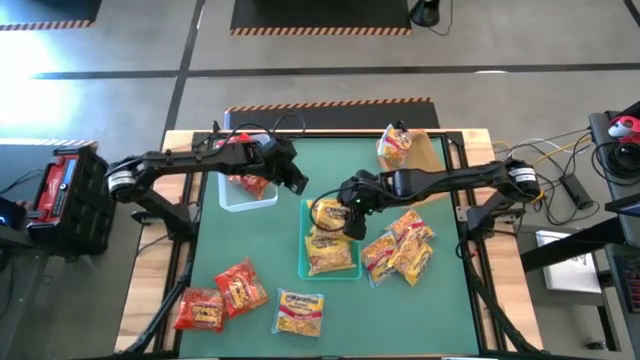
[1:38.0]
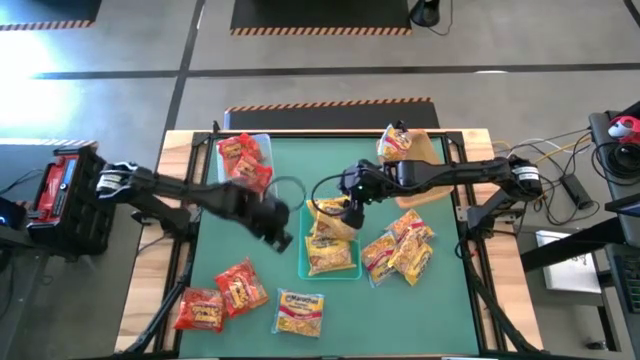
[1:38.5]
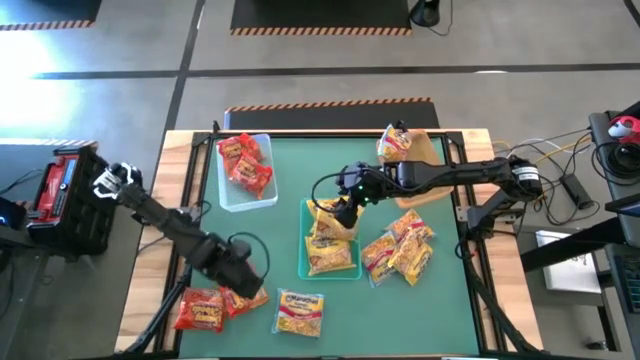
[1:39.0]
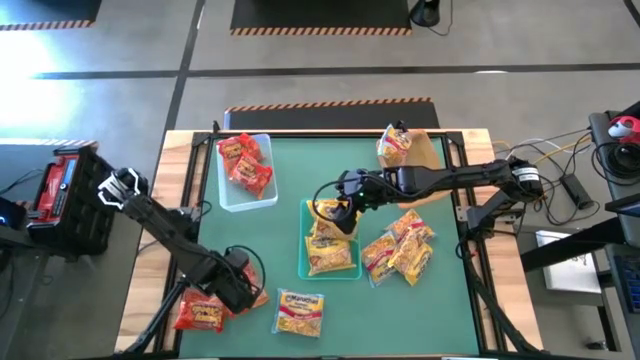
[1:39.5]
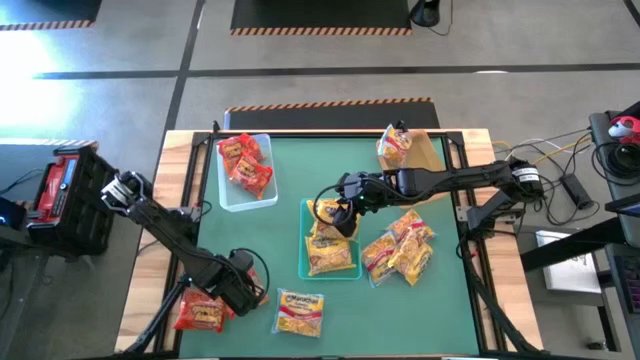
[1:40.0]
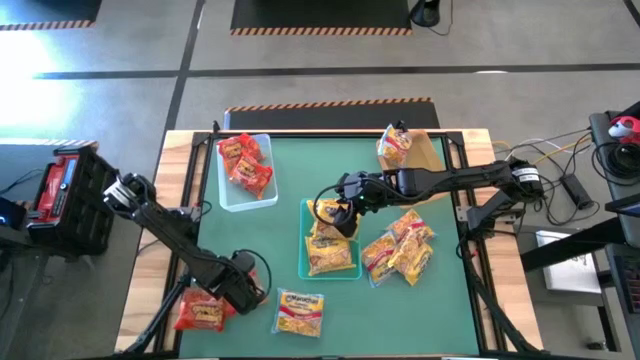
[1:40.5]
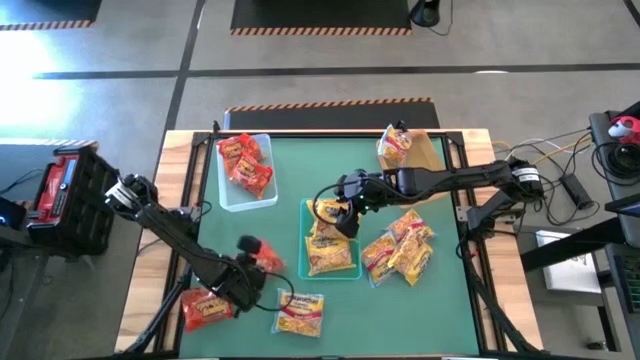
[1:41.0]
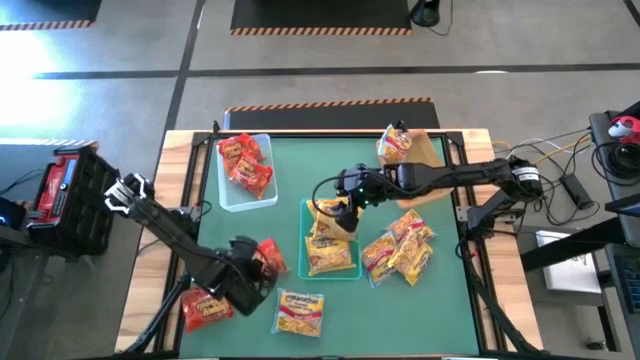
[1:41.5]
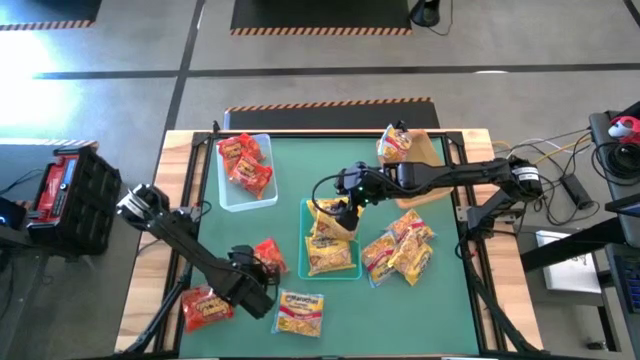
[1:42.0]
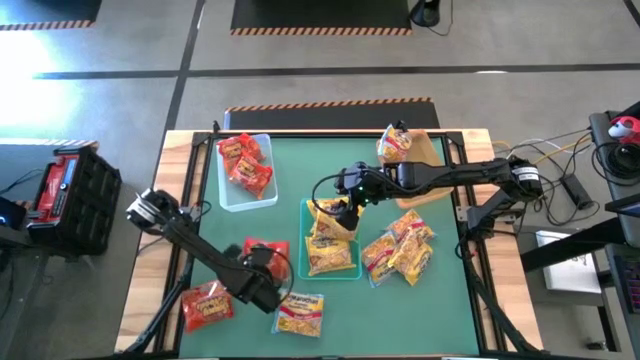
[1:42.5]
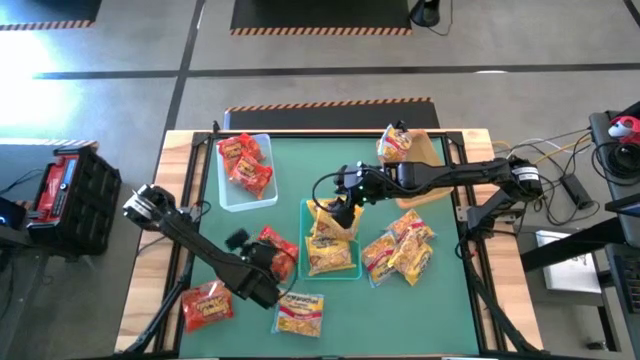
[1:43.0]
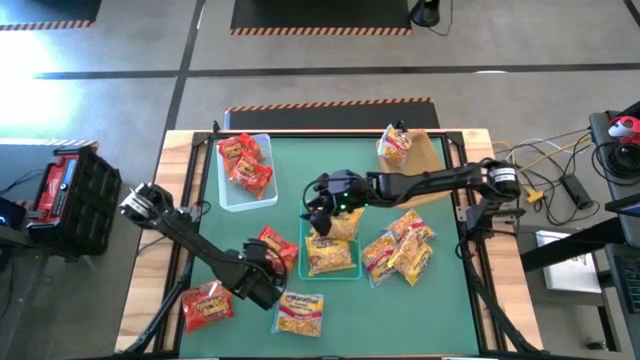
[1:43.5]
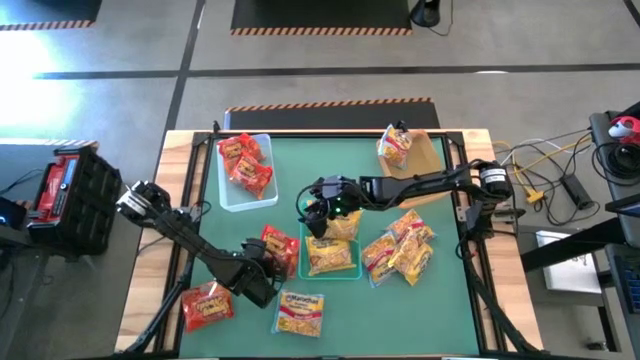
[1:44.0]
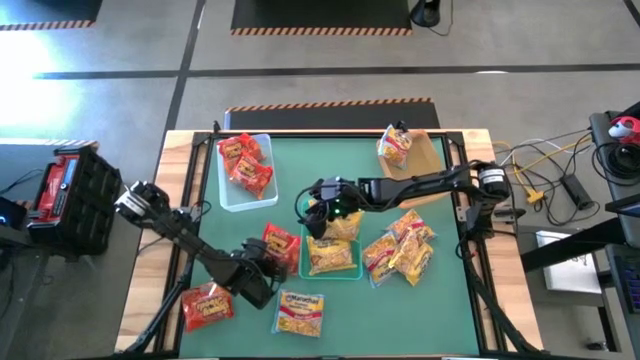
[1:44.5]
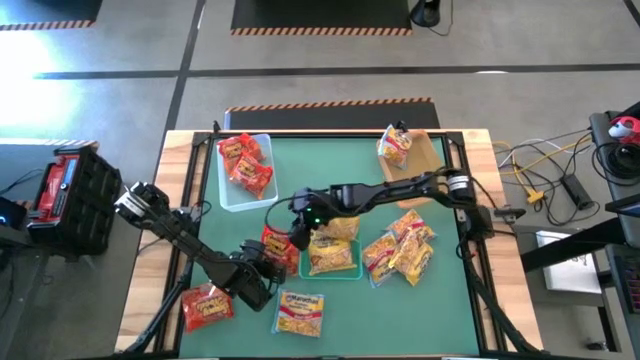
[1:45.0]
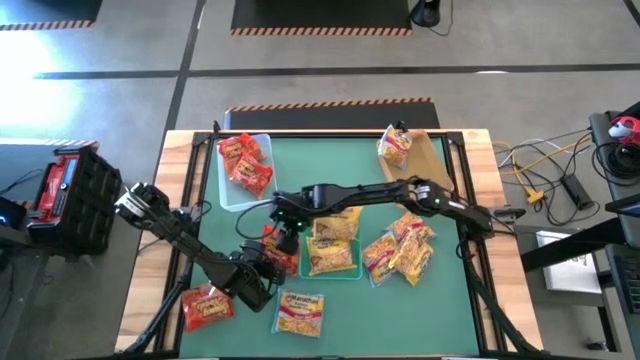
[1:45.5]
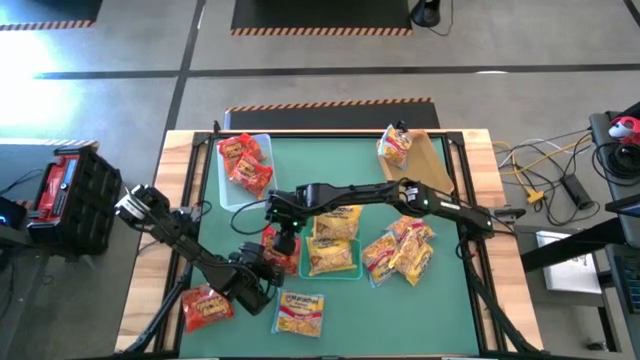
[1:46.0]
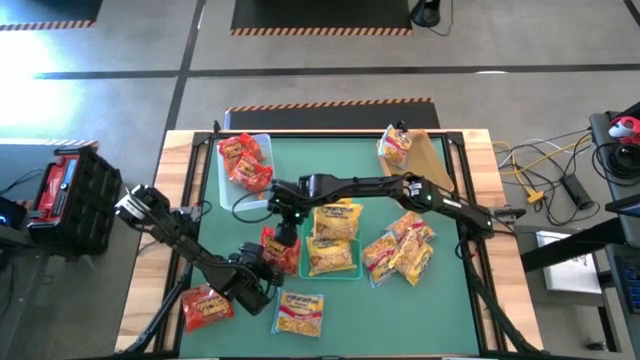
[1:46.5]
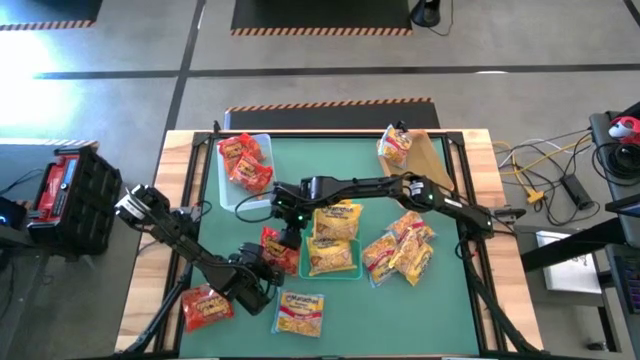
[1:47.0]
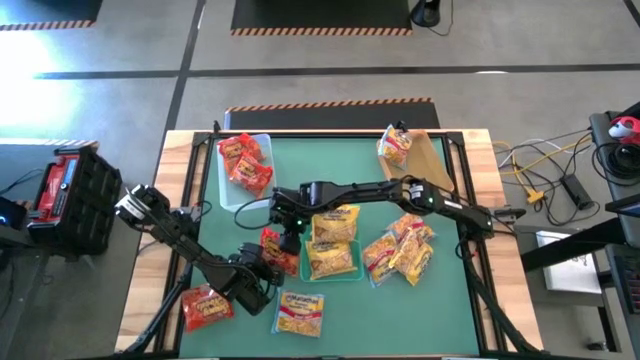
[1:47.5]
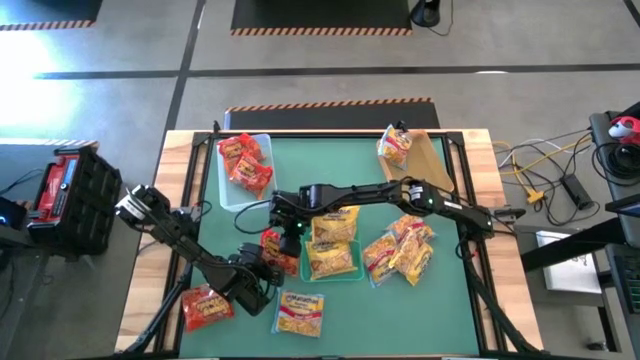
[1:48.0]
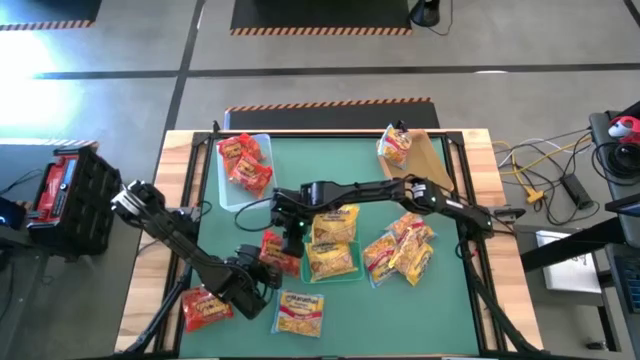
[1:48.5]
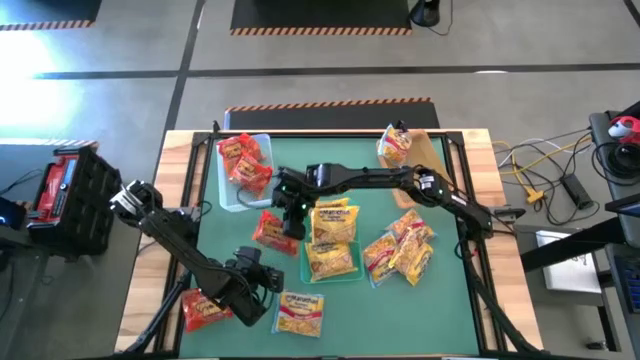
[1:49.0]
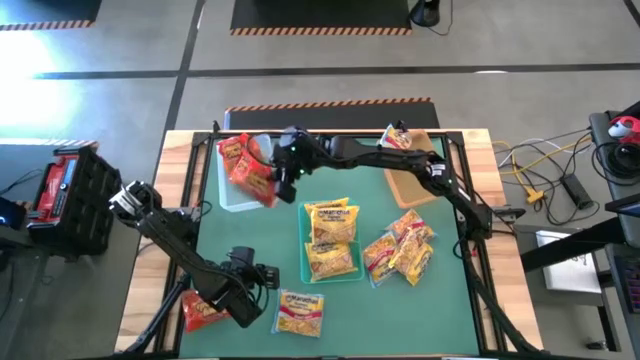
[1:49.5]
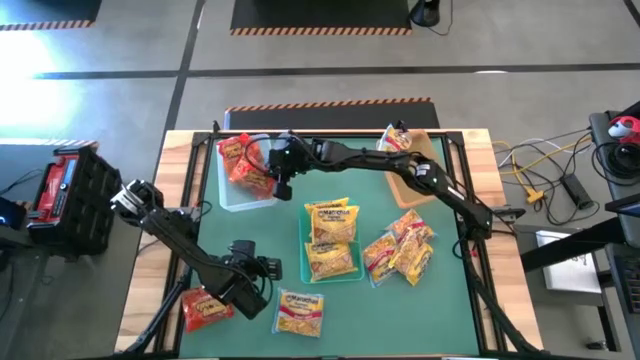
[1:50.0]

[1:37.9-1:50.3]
Task: Sort Maruchan noodles
Put the orange noodle pack into the transparent bin

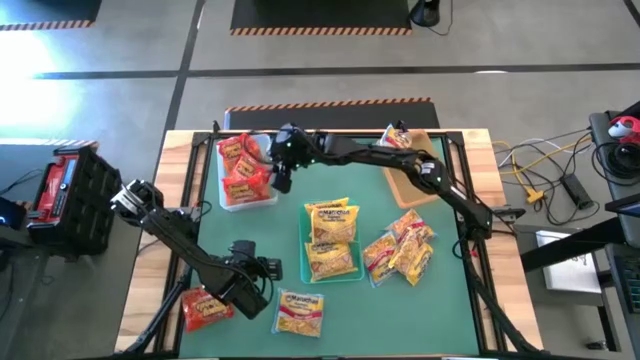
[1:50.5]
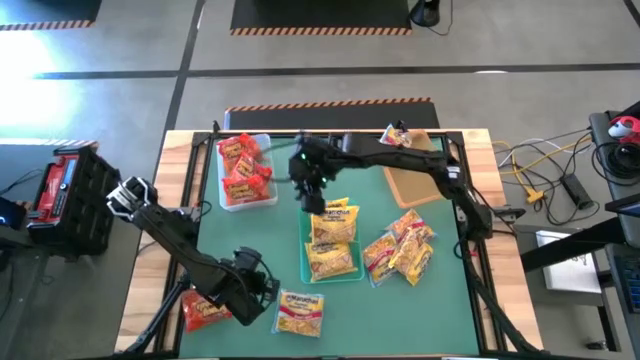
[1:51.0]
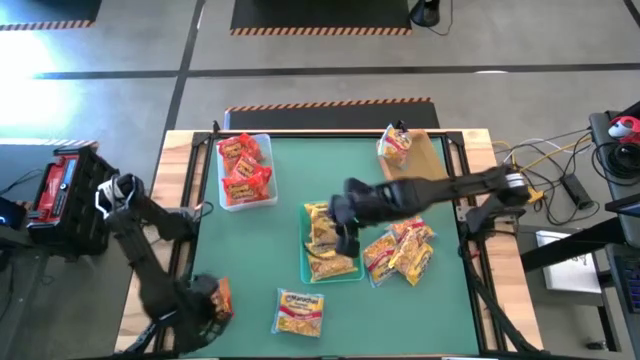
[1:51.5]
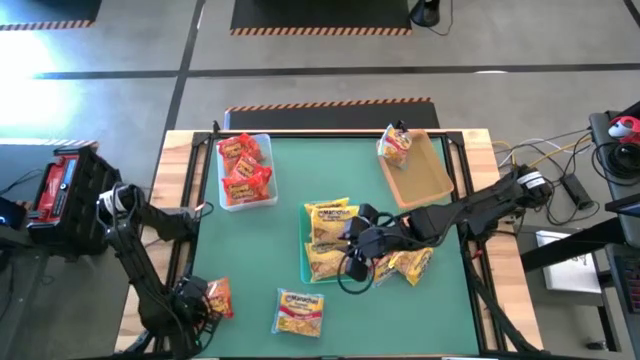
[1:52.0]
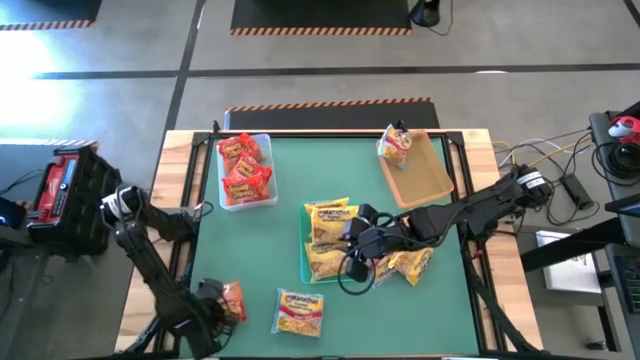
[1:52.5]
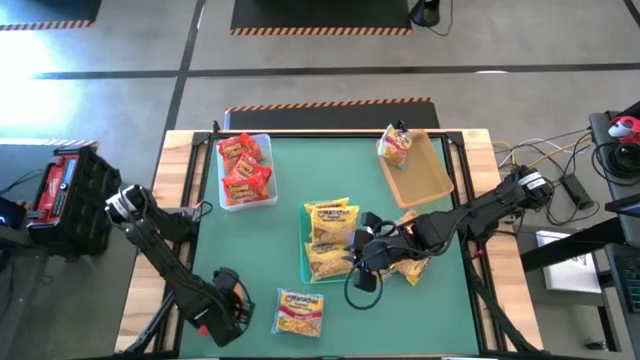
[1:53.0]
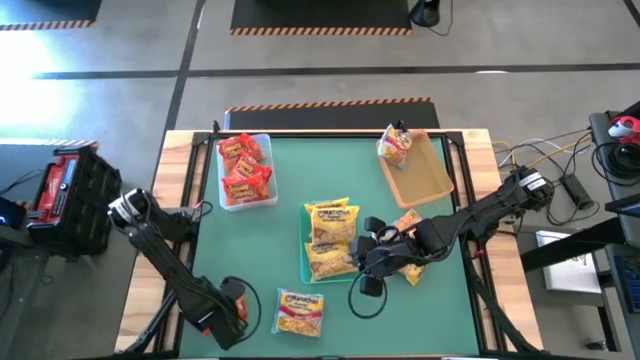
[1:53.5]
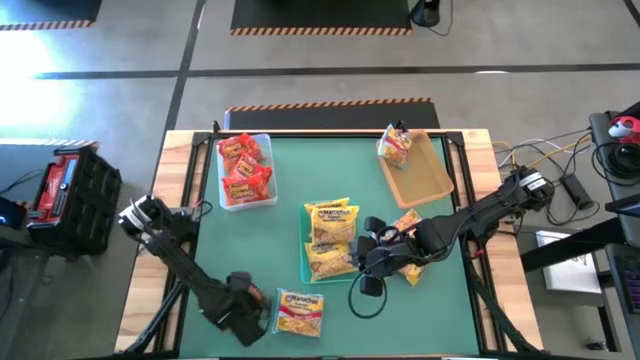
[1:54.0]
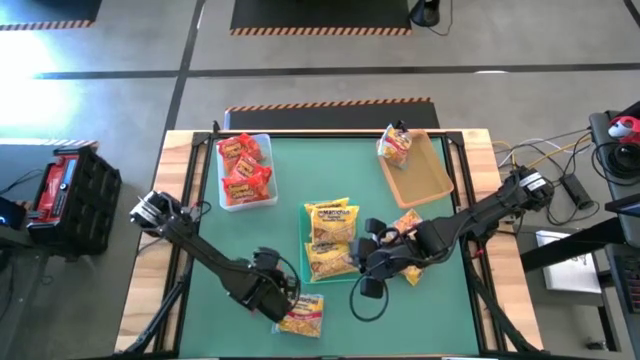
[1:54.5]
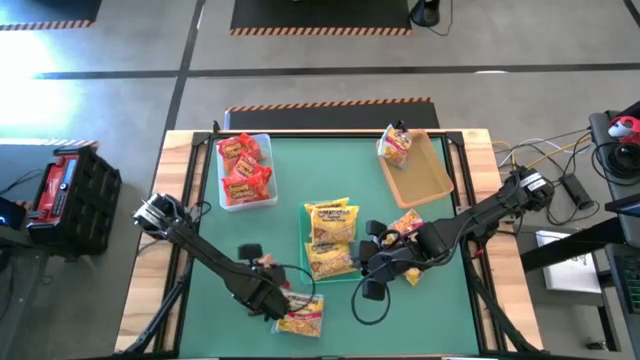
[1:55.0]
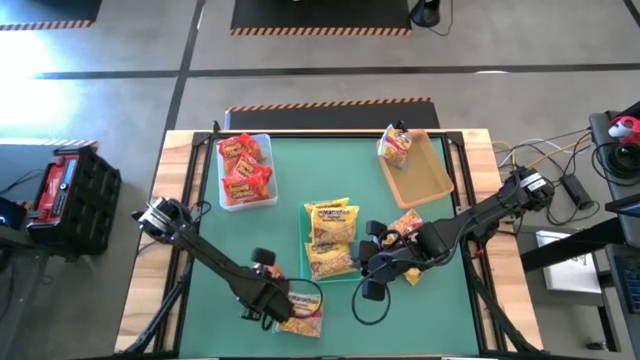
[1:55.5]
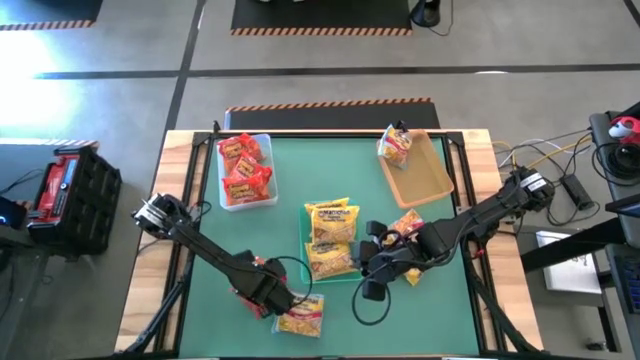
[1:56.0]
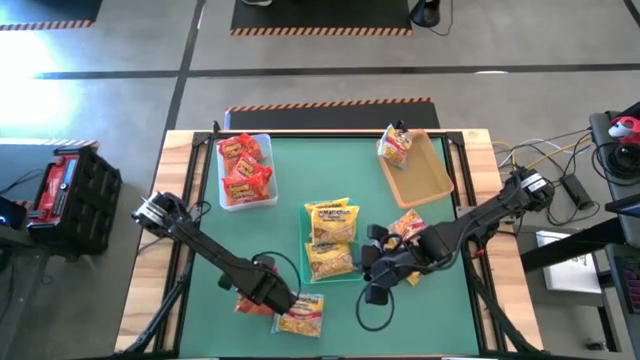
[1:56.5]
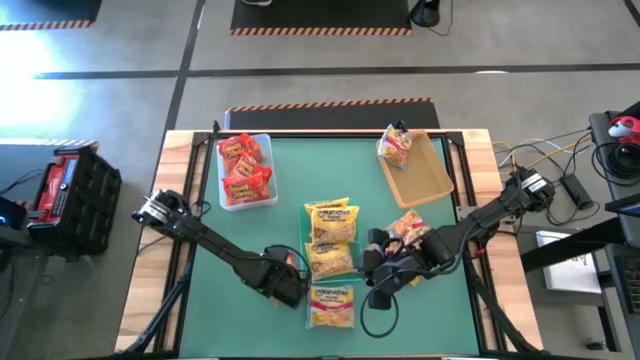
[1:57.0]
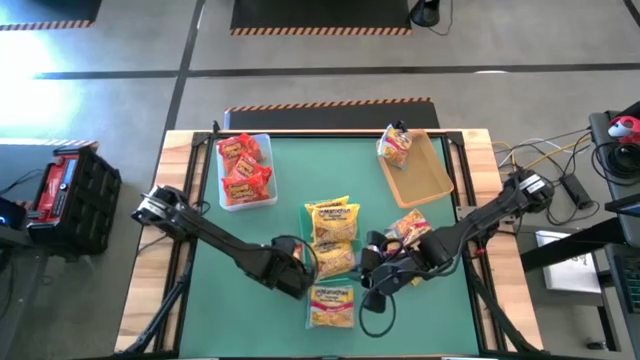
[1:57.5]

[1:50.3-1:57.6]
Adjust the orange noodle pack on the table

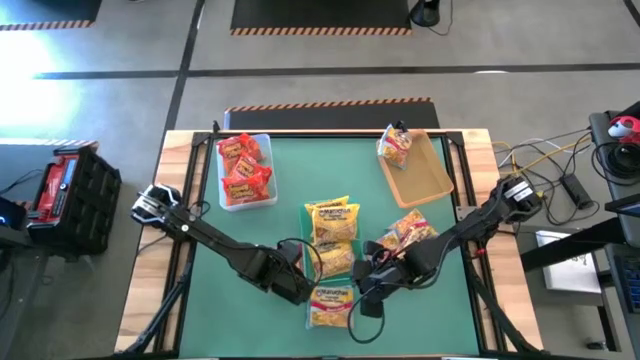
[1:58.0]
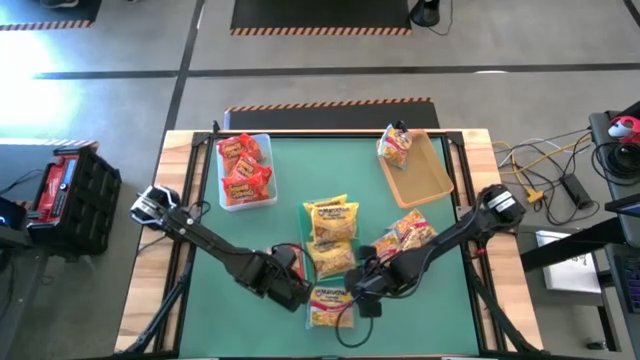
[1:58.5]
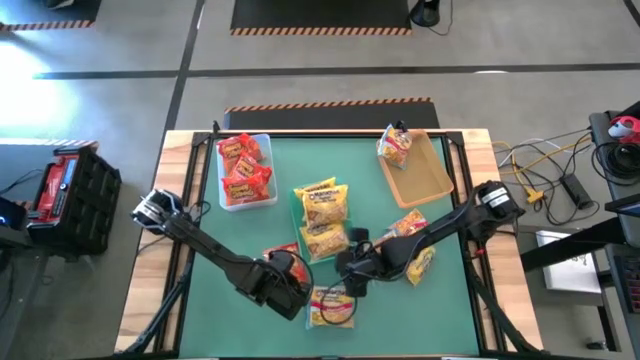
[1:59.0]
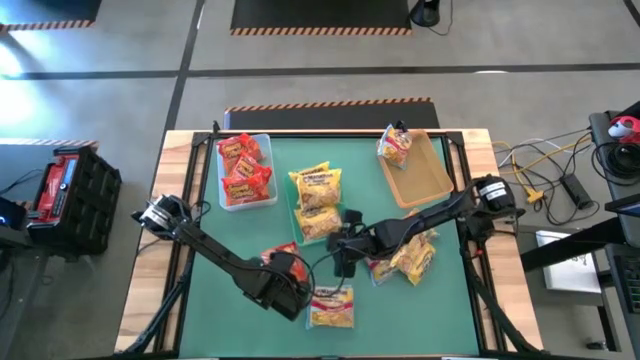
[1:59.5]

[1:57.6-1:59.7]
Adjust the blue bin on the table
